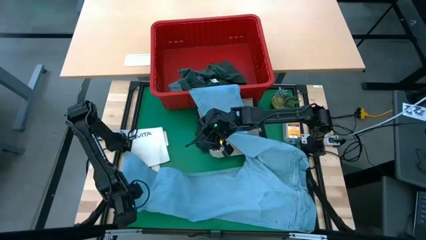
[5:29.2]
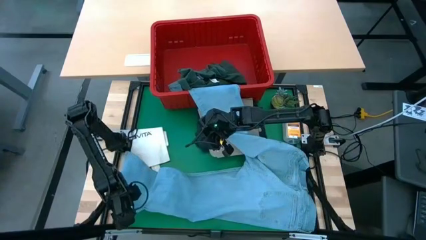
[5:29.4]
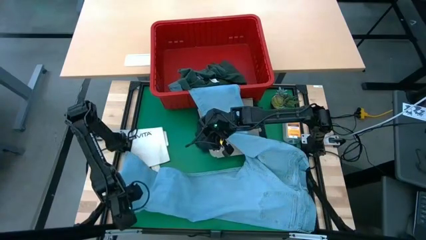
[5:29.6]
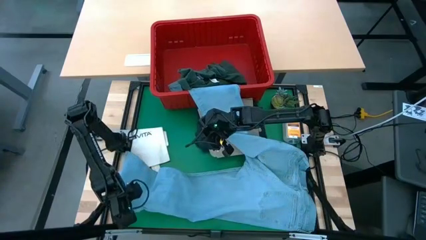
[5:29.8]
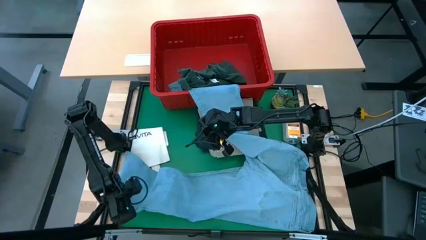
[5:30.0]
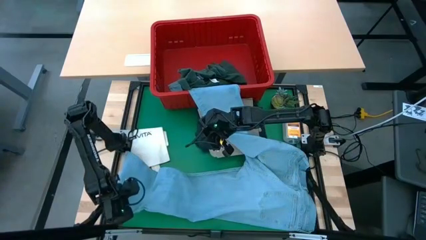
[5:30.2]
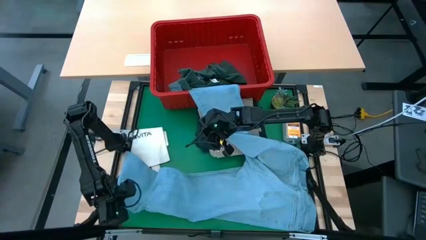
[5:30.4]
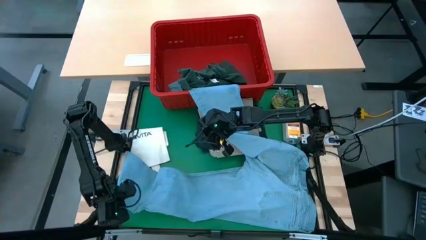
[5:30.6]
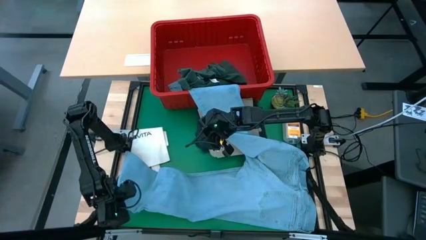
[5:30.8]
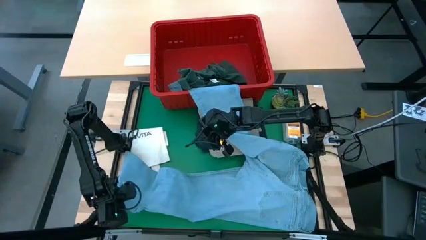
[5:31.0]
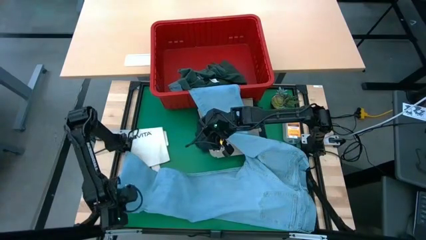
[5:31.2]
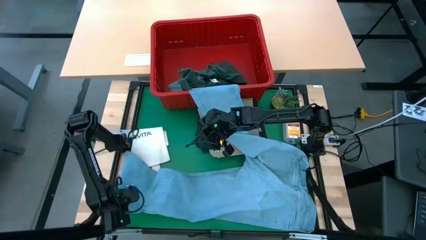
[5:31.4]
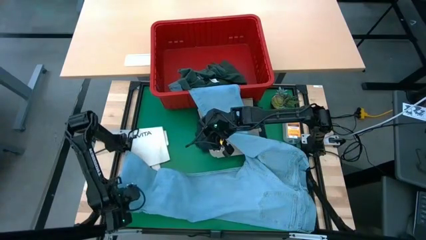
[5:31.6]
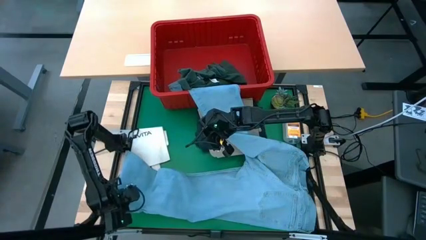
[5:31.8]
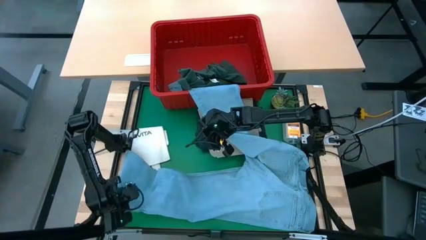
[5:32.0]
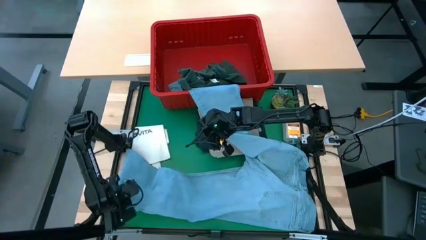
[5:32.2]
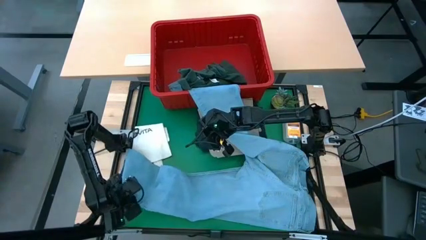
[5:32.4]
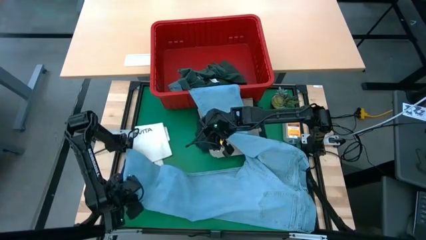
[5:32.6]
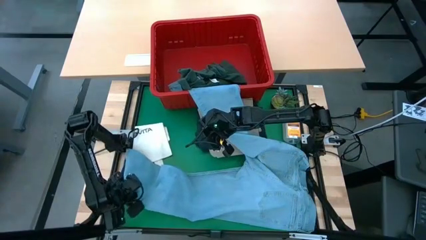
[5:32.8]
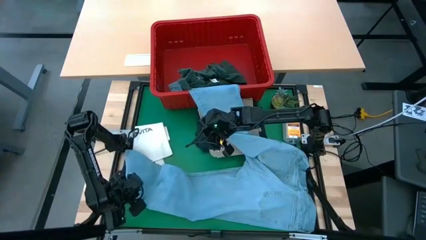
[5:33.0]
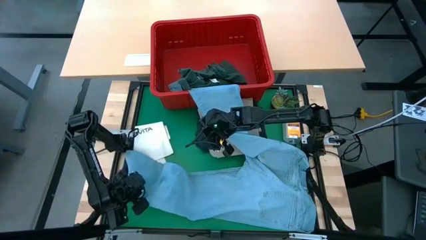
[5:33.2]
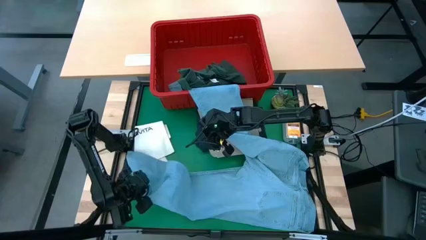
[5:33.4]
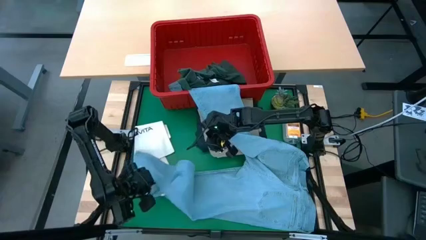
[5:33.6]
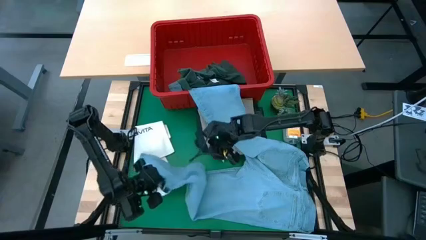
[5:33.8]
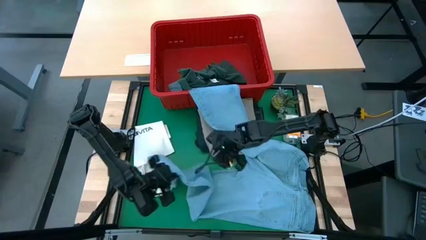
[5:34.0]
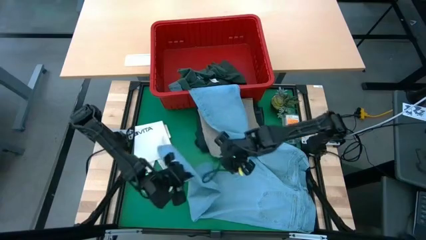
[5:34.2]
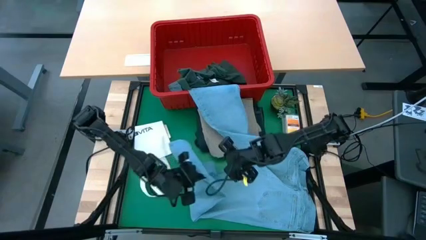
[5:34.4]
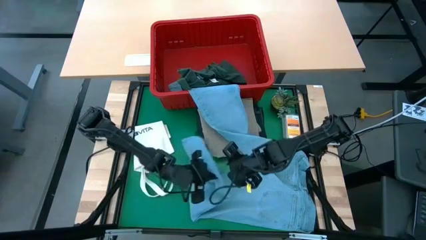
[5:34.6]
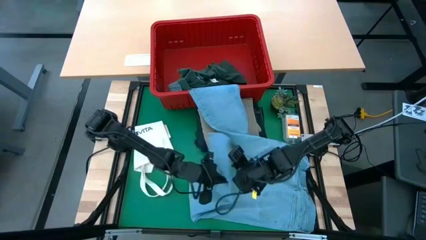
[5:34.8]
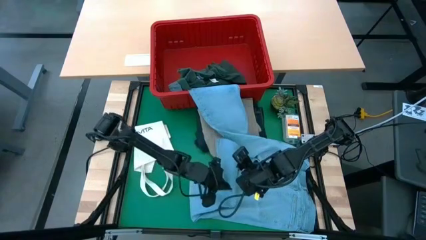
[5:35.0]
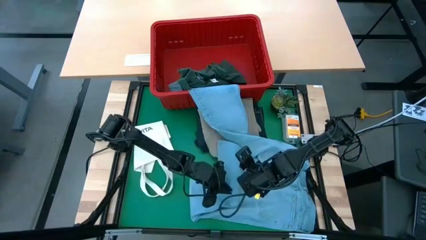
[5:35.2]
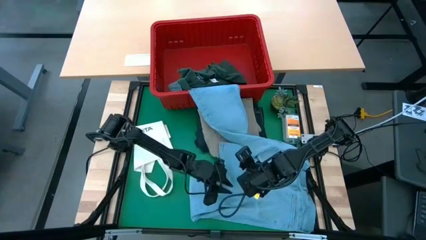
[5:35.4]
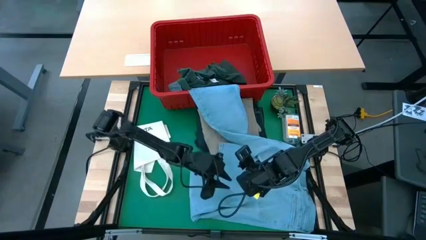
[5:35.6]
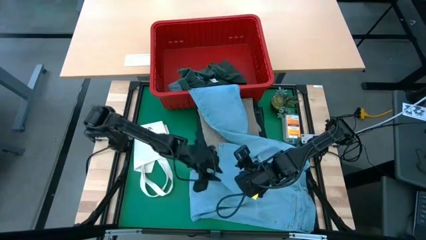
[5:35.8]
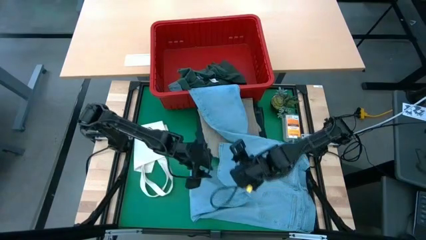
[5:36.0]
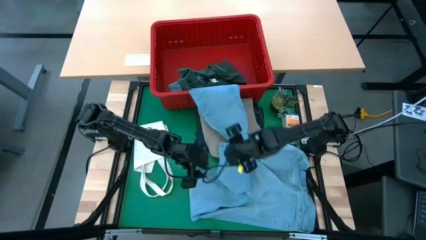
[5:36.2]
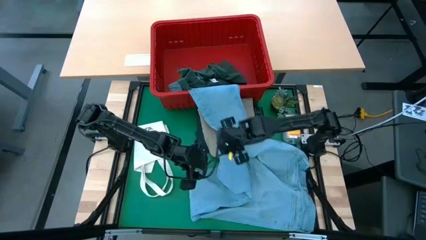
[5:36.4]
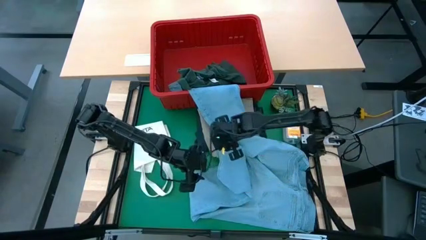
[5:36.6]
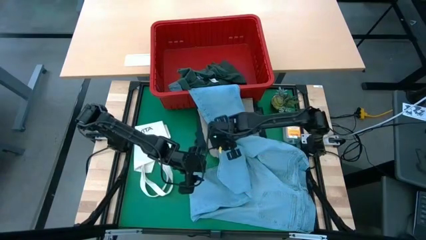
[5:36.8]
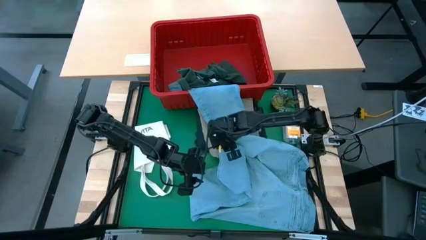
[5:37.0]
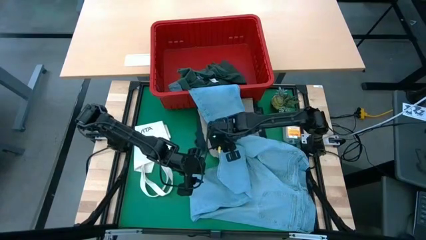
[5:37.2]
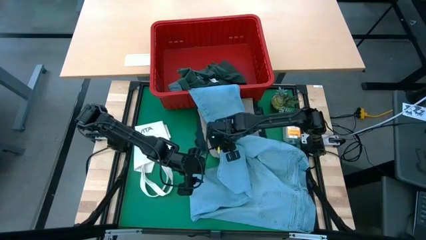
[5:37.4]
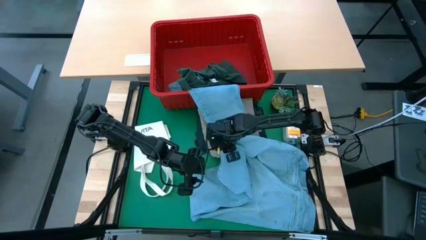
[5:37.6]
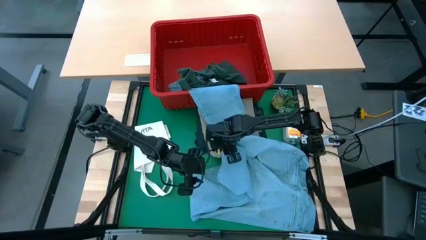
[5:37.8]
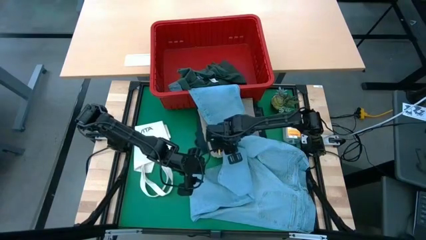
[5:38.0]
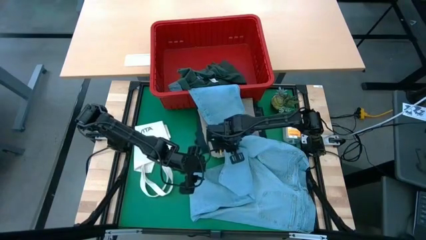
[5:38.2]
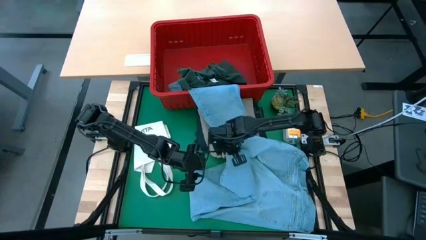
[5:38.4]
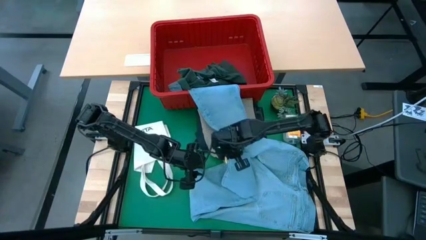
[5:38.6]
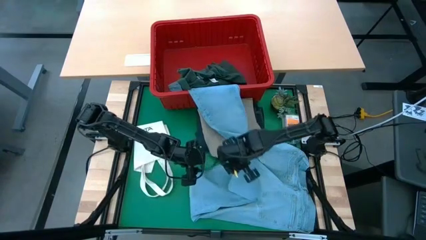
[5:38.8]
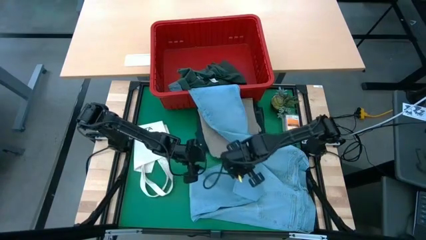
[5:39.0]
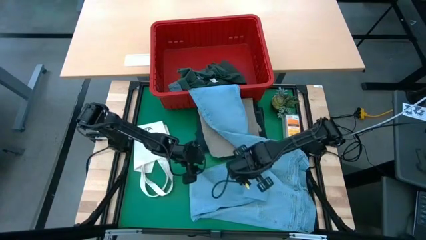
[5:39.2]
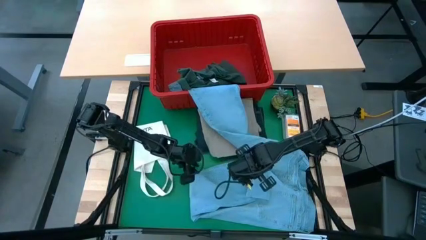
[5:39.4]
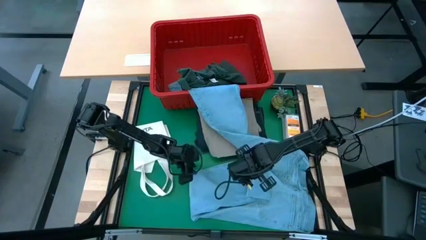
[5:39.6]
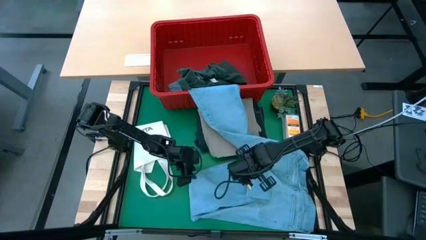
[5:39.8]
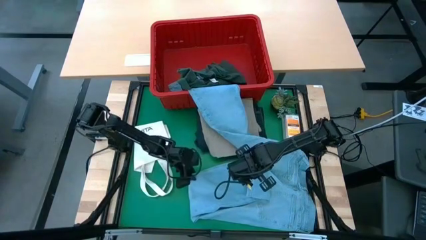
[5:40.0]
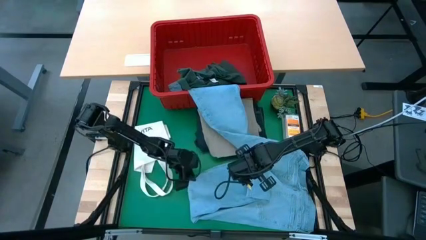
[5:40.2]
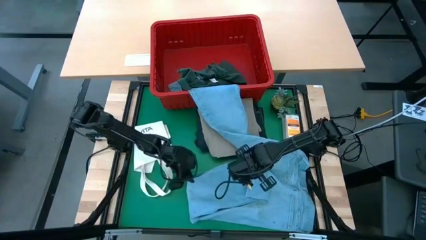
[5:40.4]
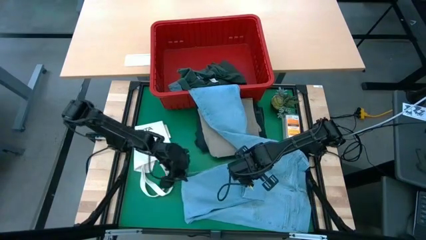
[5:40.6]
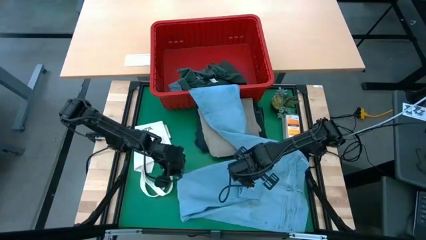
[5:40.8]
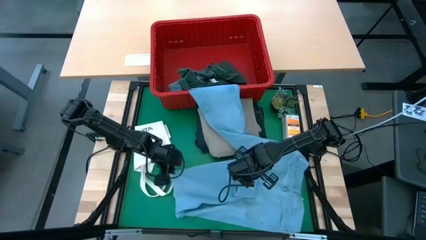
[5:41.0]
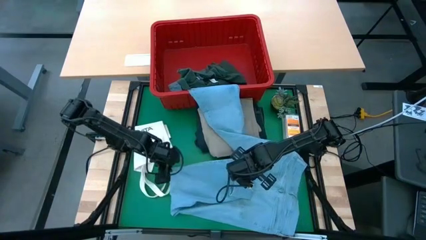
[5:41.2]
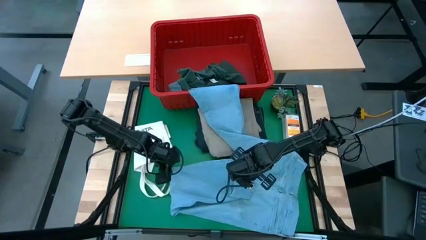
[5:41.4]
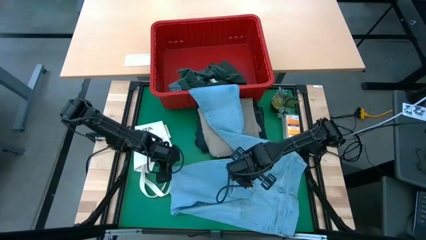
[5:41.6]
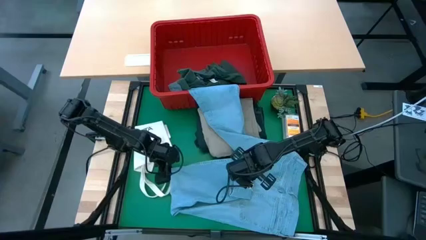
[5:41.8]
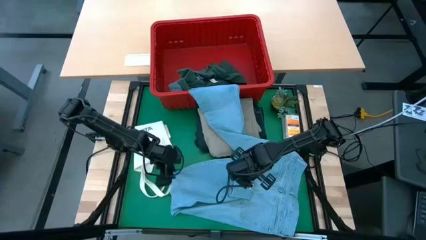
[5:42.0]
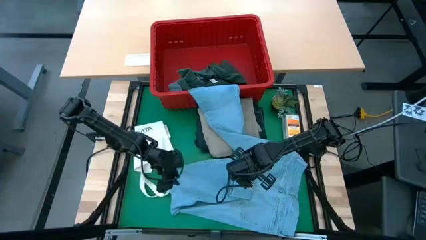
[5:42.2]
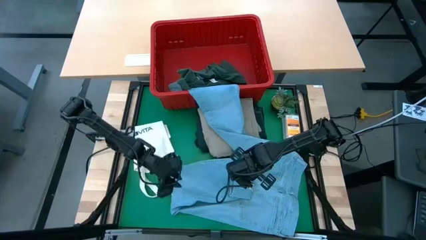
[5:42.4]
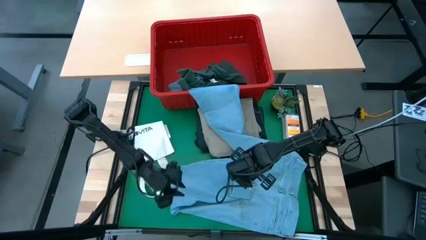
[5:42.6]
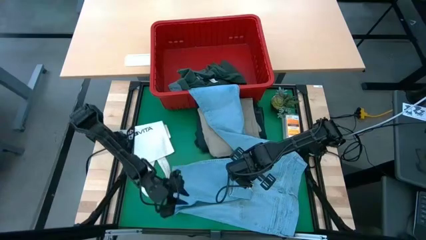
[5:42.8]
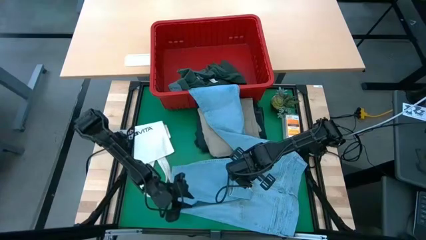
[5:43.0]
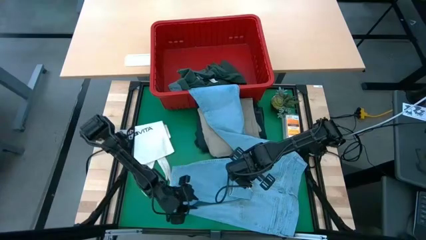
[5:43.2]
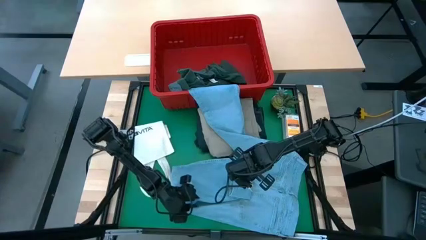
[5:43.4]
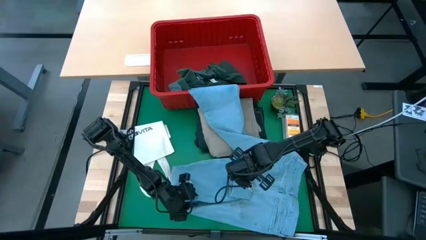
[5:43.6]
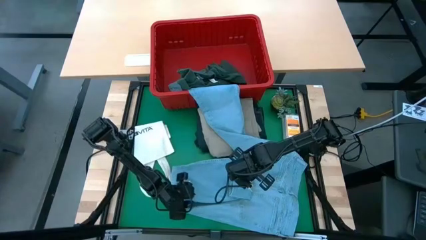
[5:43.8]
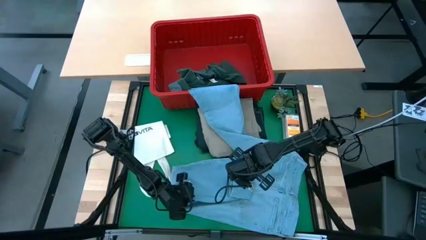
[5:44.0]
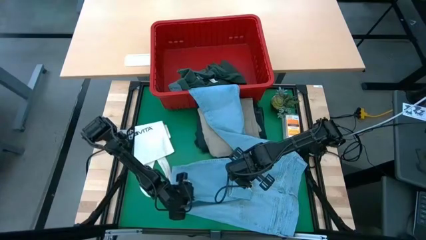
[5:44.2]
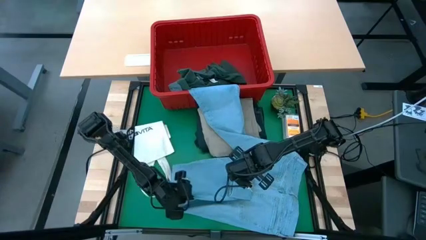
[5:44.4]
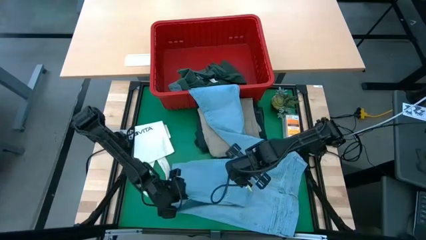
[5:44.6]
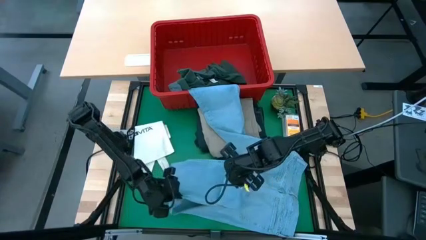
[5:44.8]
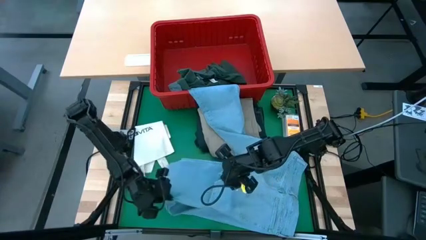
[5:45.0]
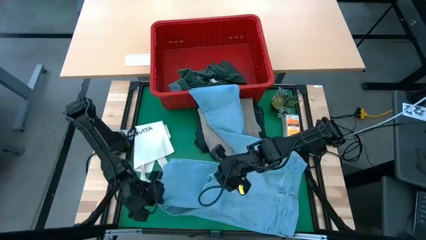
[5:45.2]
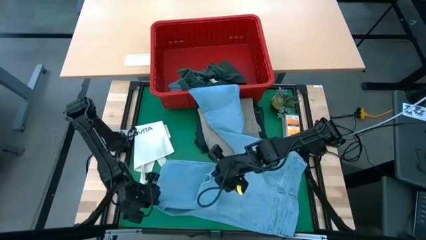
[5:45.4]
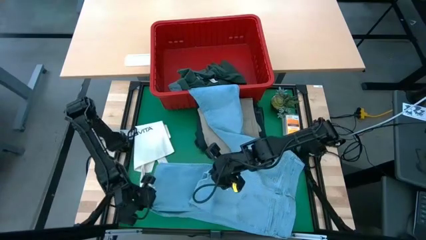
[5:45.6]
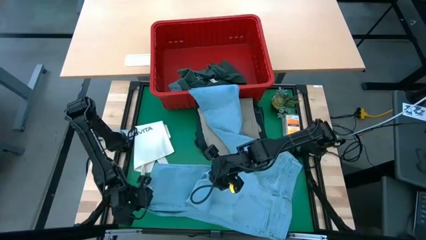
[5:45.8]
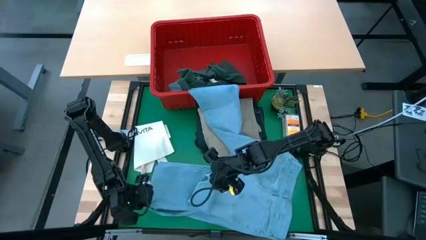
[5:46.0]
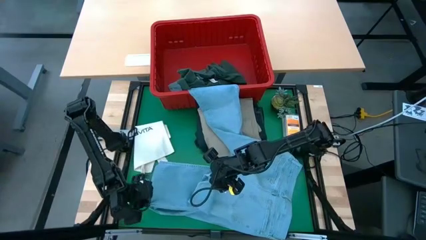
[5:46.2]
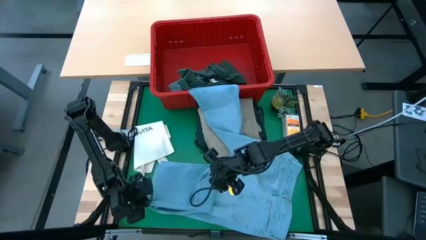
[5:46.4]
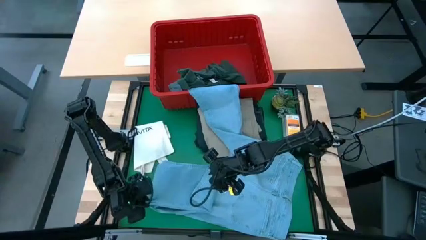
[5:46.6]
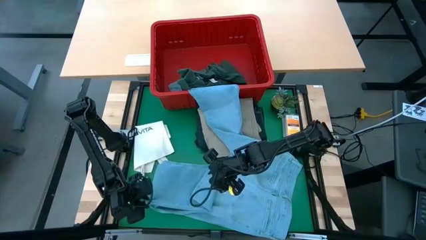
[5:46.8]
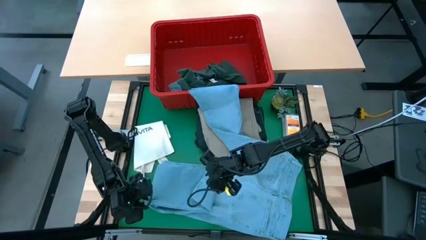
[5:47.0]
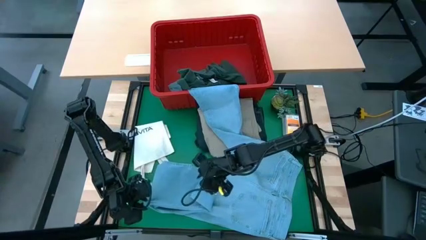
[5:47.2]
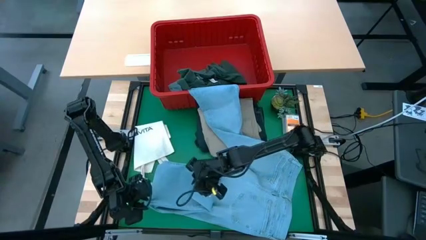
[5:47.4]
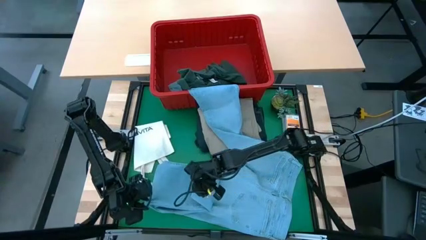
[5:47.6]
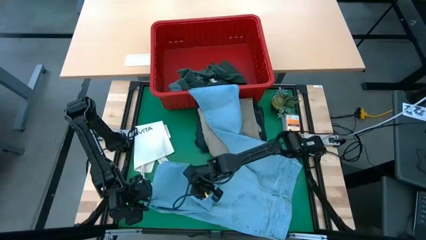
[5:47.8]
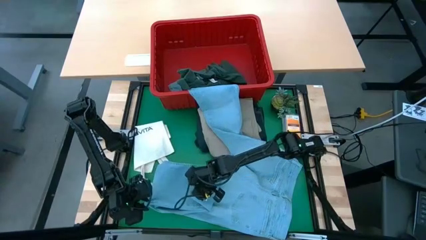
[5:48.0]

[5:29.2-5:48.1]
Task: Fold laundry
Remove the blue pants from the laundry bin
